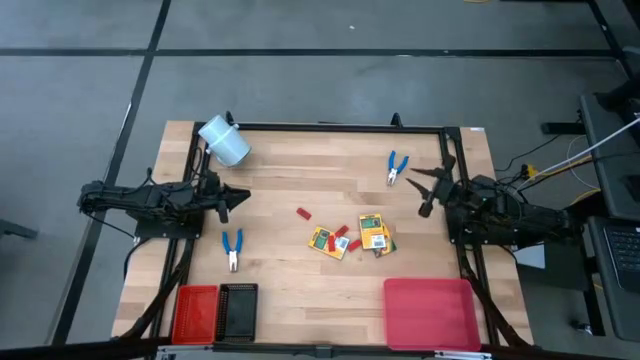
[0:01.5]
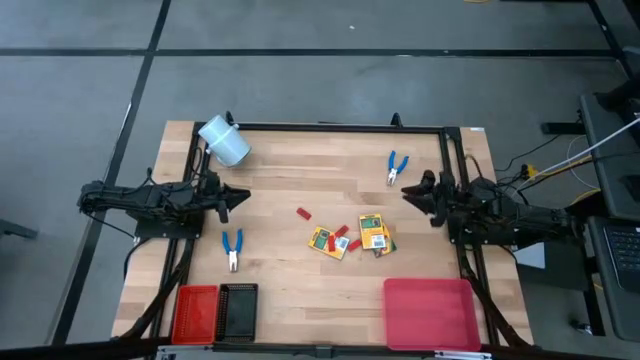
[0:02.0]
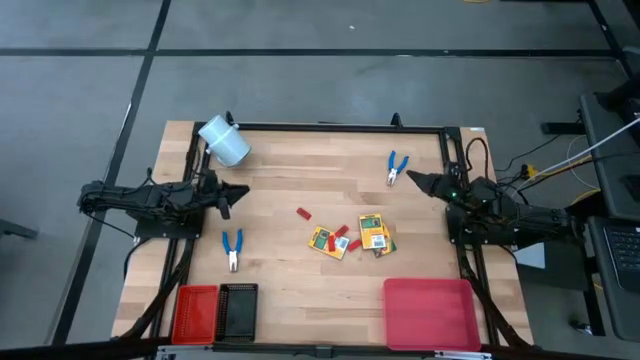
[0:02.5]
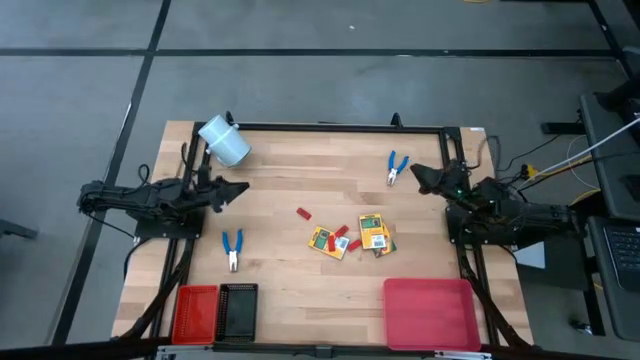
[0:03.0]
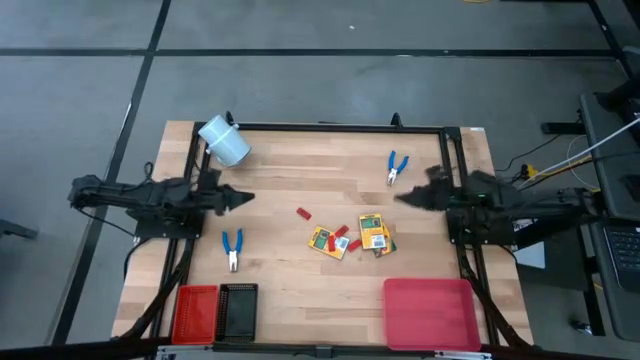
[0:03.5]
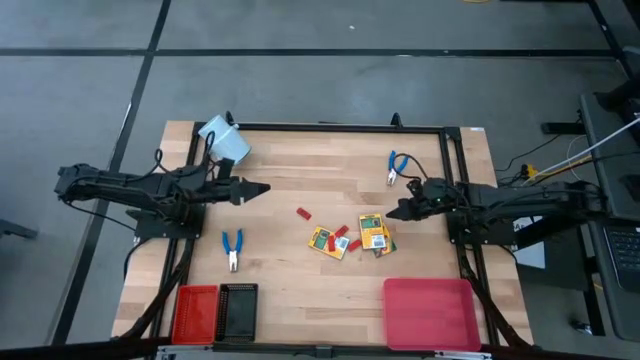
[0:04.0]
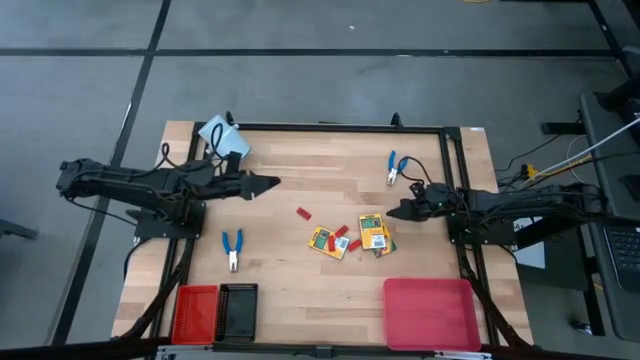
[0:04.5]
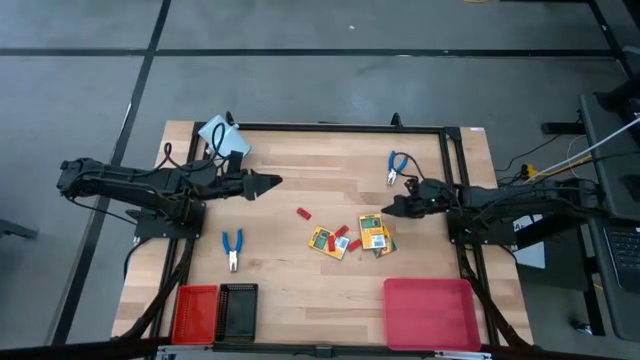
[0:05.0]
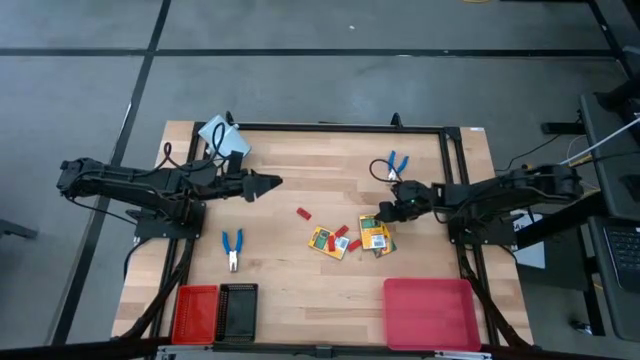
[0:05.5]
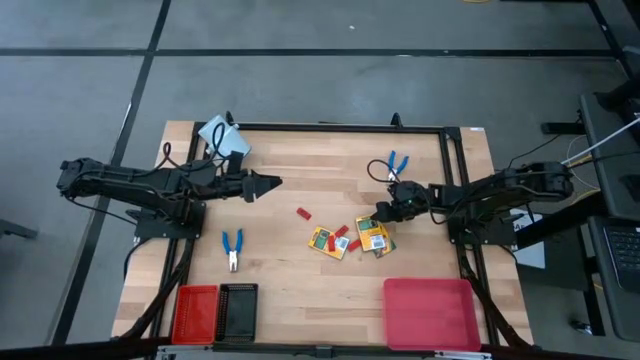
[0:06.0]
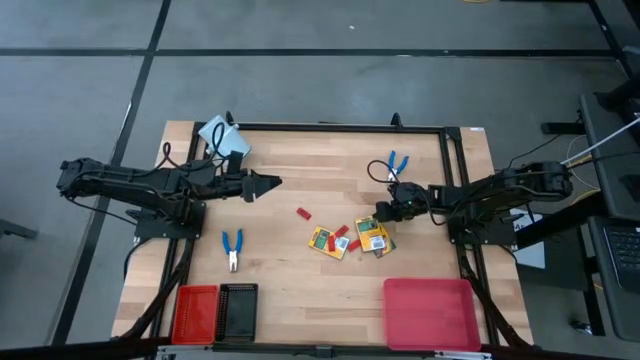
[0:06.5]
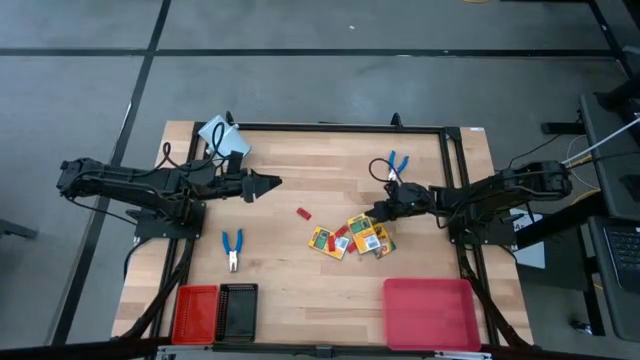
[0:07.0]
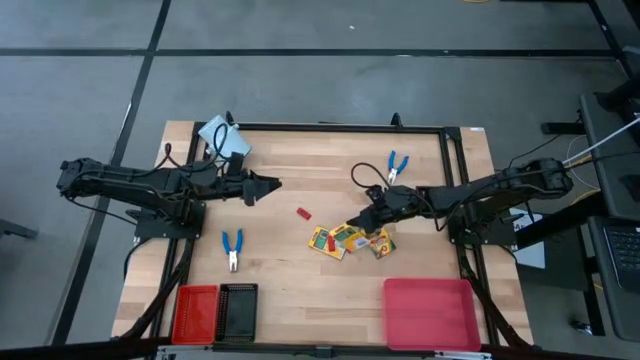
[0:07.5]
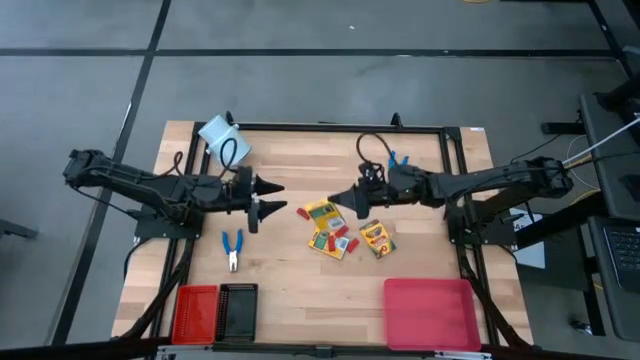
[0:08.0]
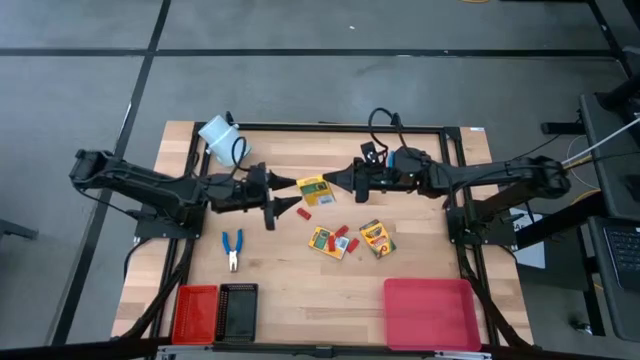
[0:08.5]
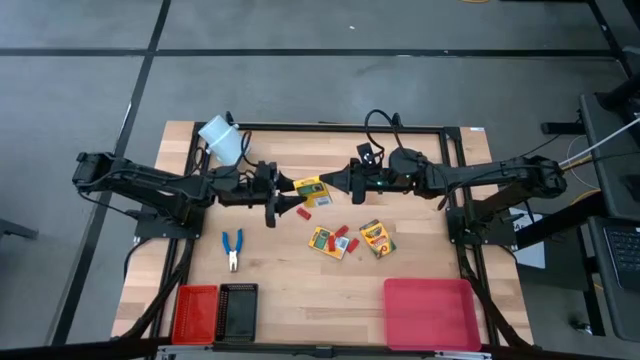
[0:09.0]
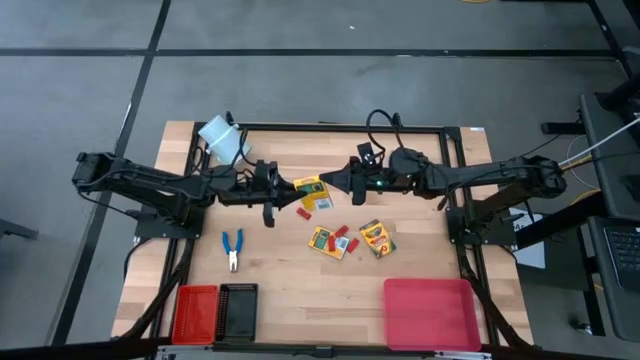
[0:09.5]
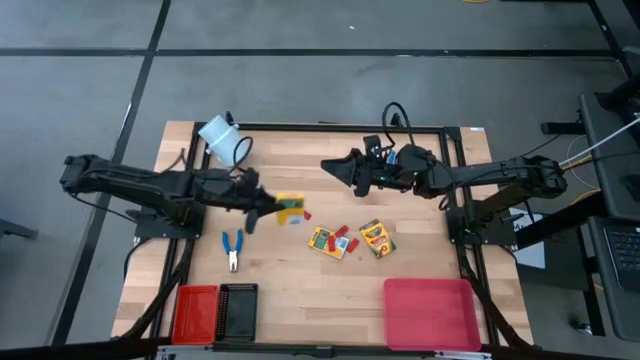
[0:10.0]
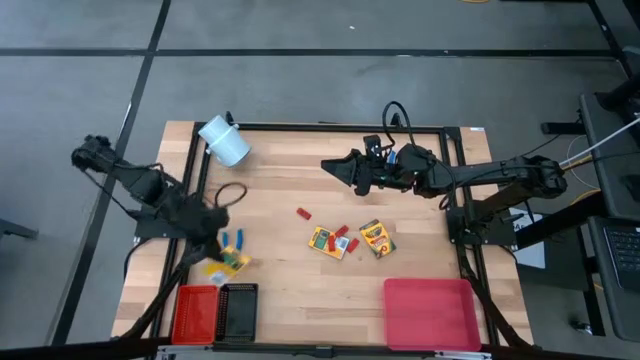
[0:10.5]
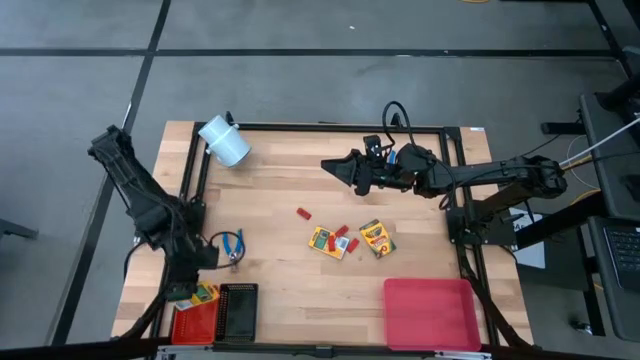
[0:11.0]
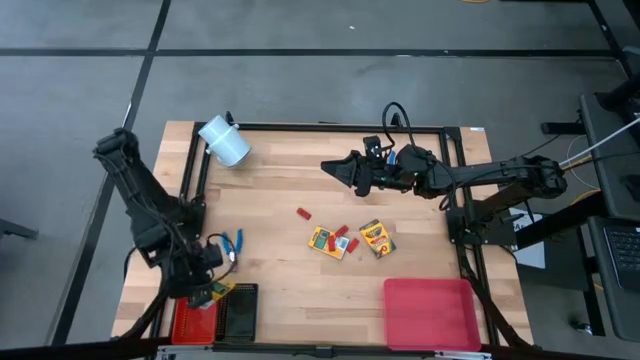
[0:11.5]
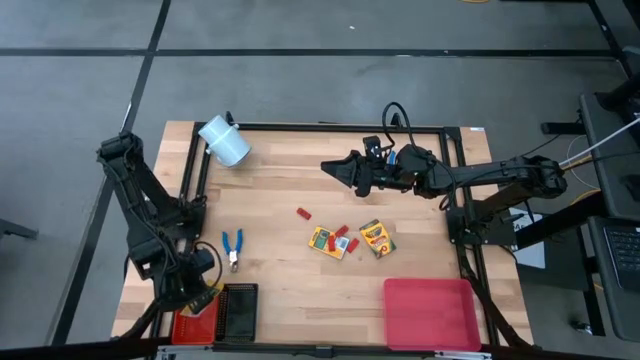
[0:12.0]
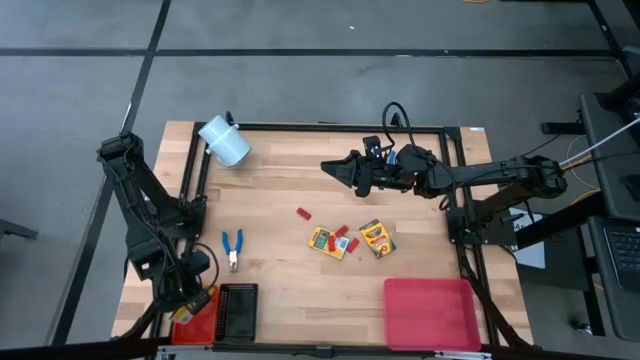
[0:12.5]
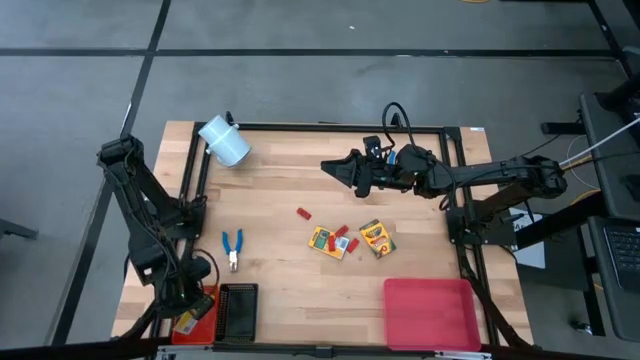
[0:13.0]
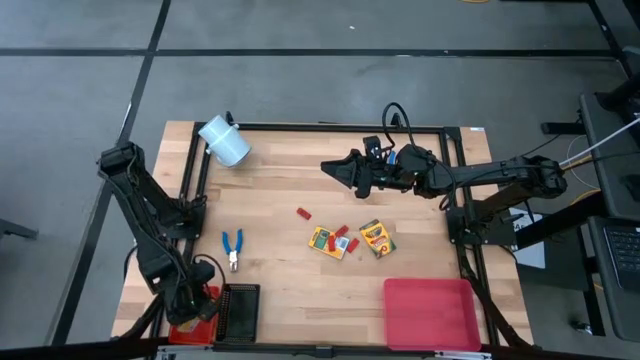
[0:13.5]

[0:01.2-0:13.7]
Task: Pick & Place School Supplies
Put the yellow crayon box into the red basket
